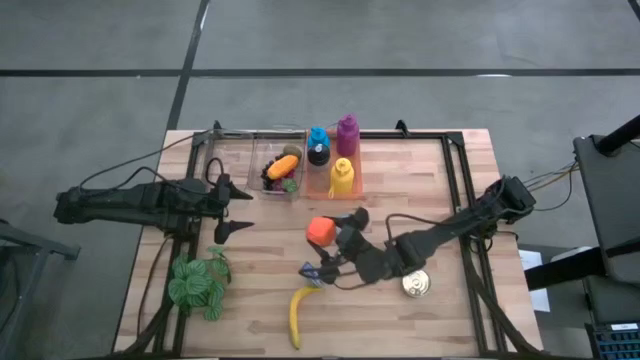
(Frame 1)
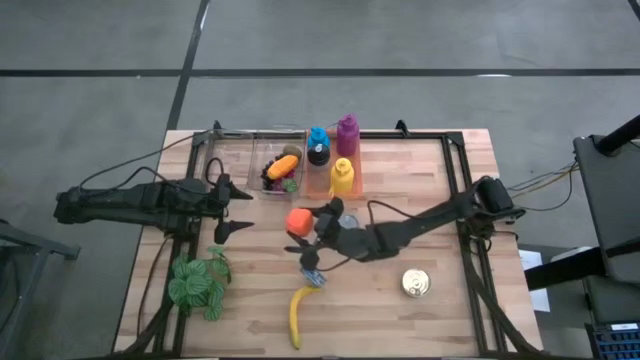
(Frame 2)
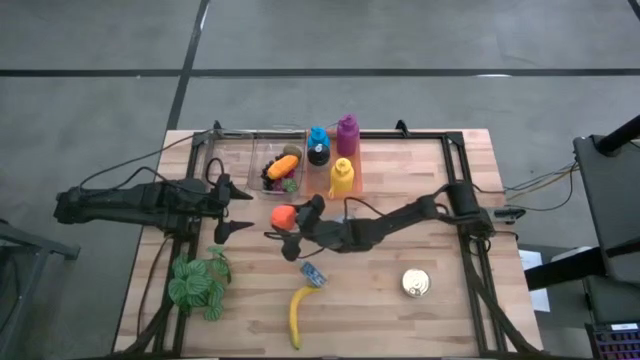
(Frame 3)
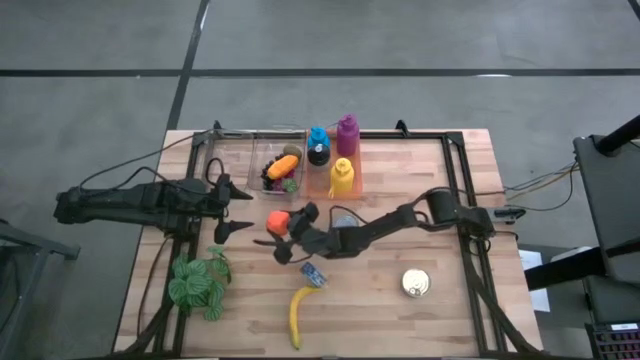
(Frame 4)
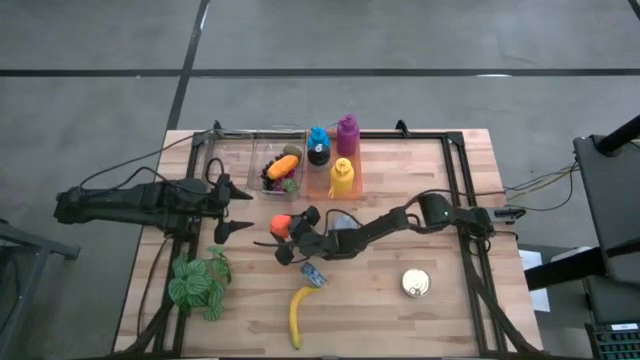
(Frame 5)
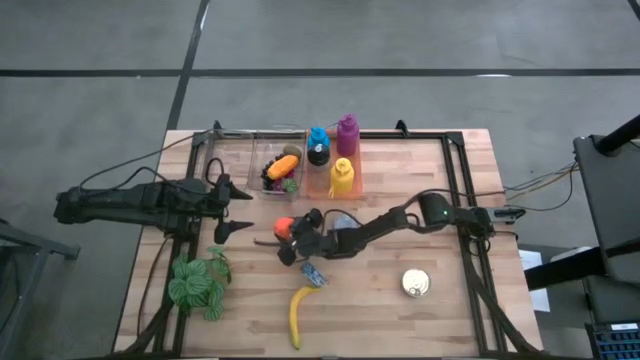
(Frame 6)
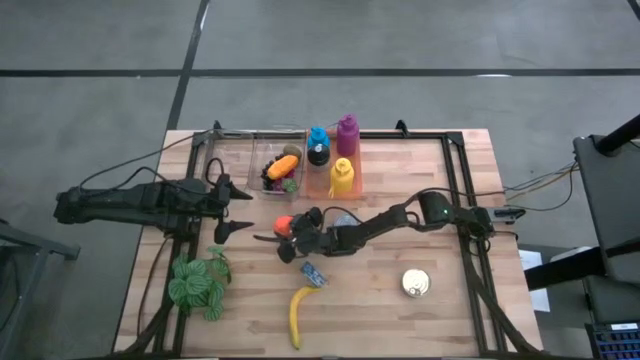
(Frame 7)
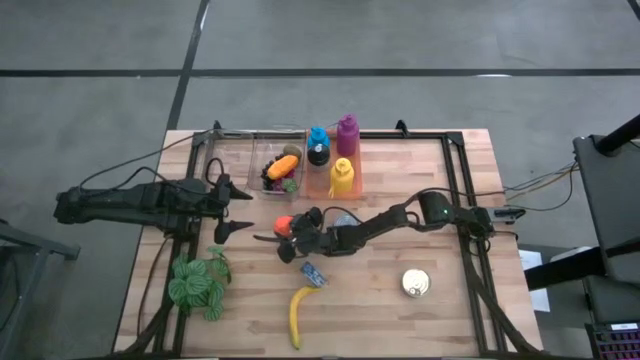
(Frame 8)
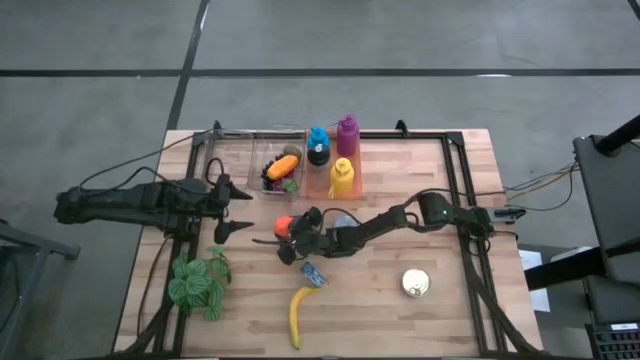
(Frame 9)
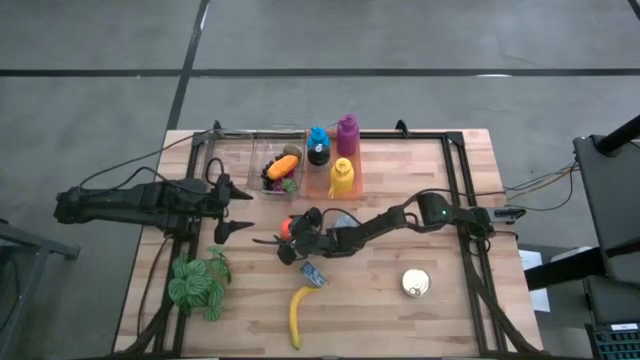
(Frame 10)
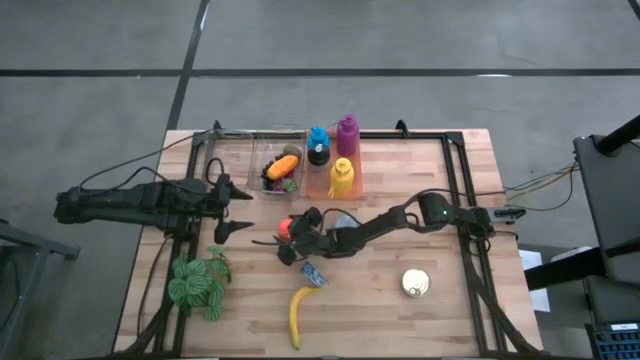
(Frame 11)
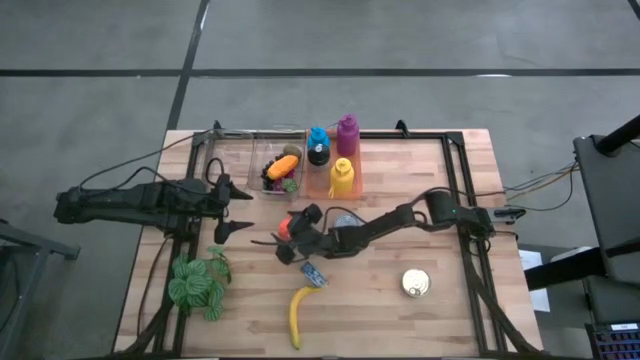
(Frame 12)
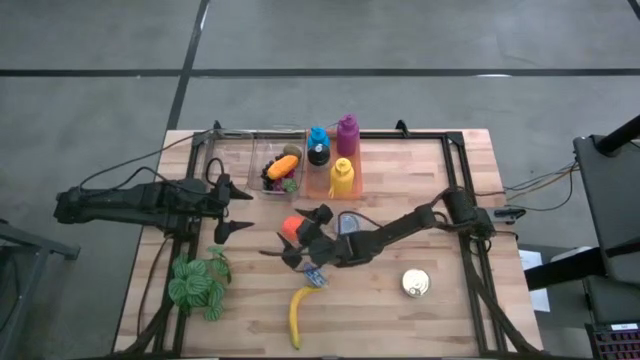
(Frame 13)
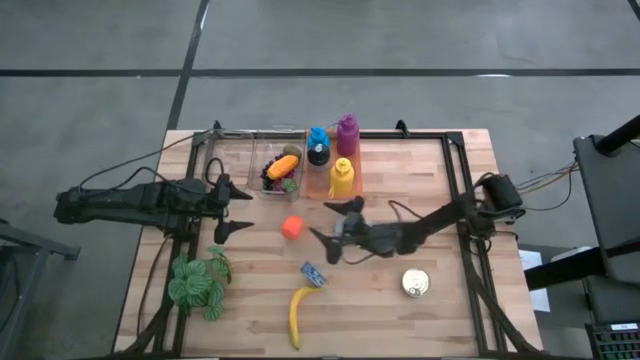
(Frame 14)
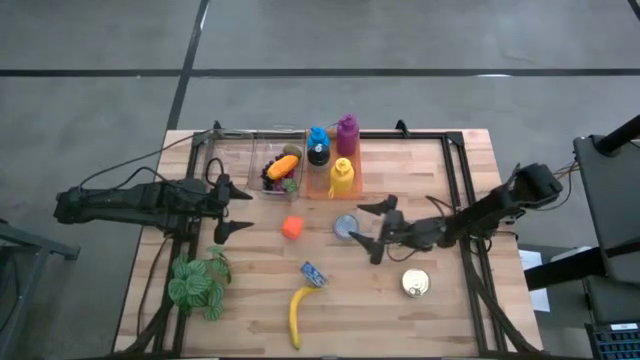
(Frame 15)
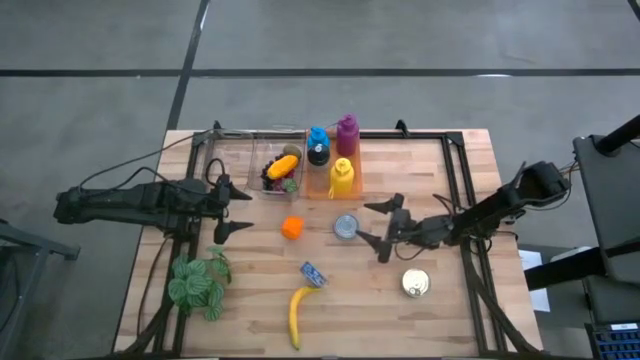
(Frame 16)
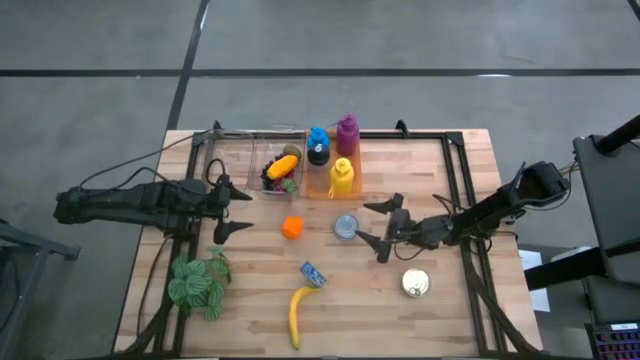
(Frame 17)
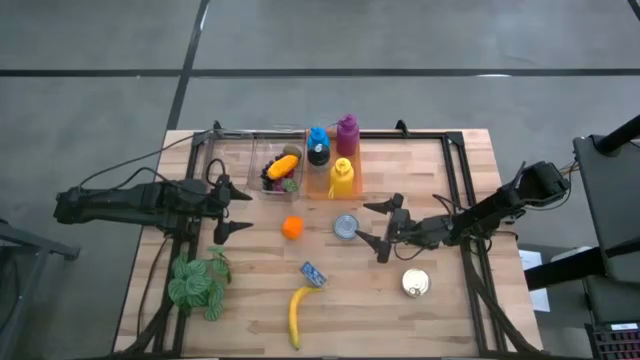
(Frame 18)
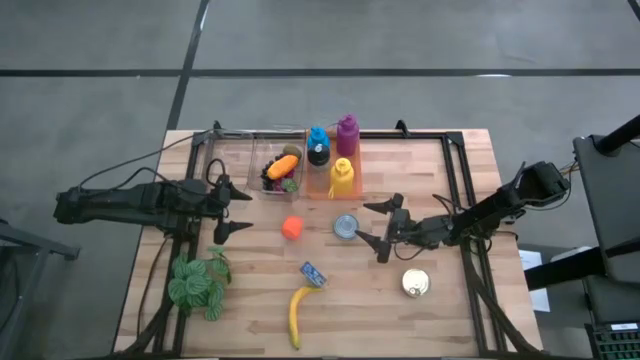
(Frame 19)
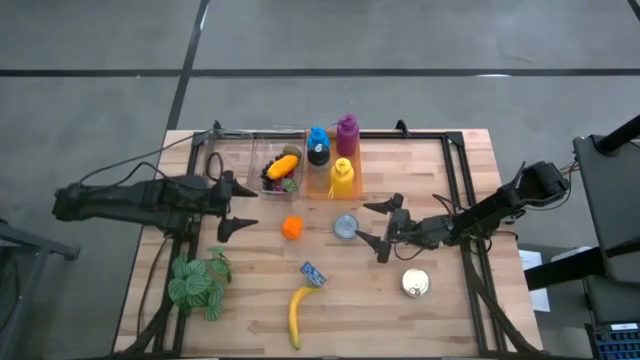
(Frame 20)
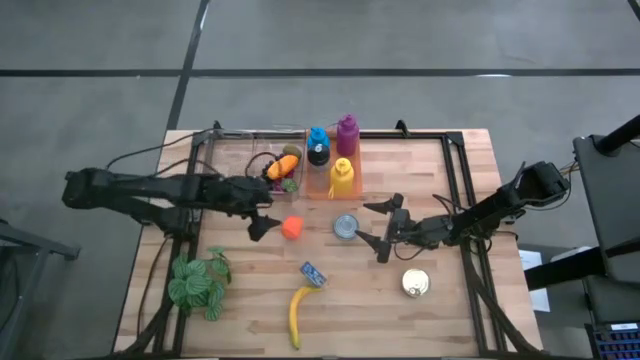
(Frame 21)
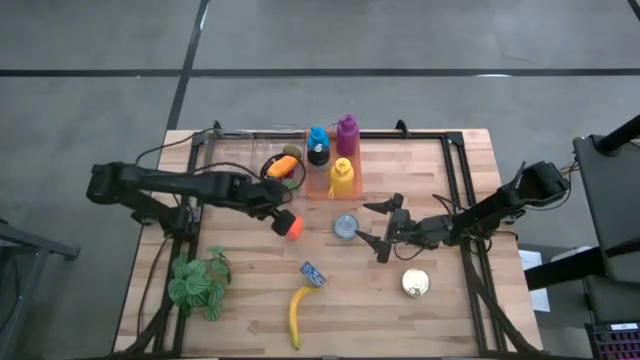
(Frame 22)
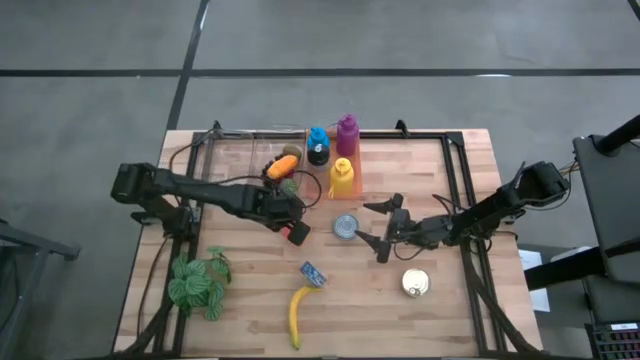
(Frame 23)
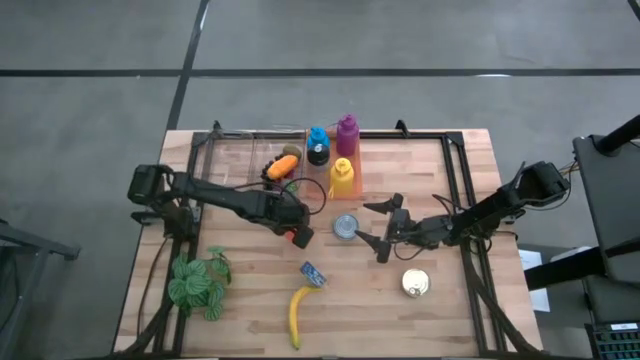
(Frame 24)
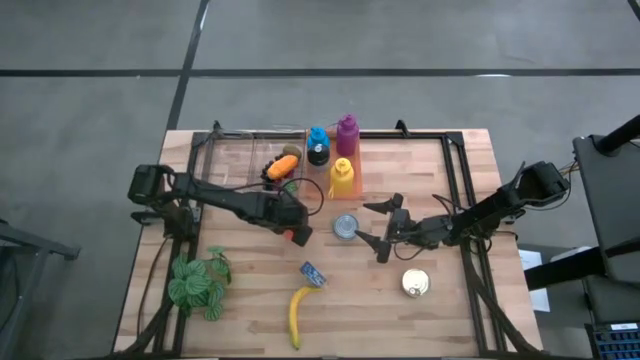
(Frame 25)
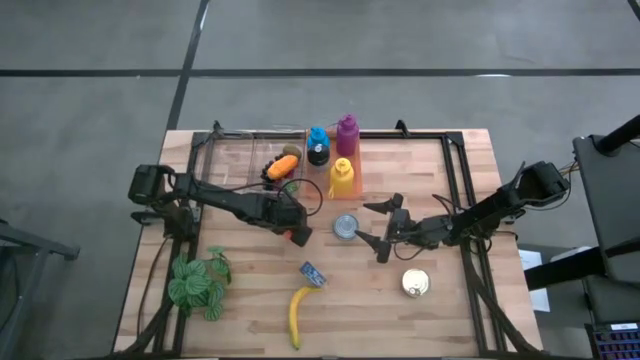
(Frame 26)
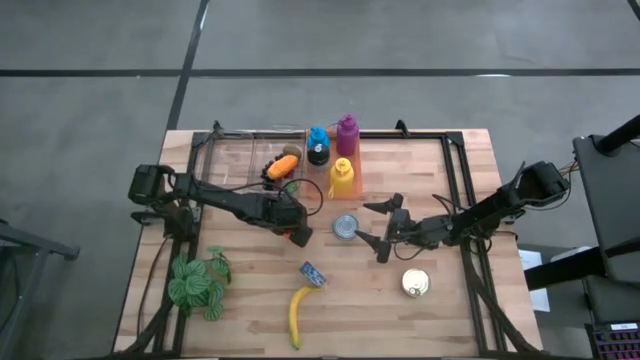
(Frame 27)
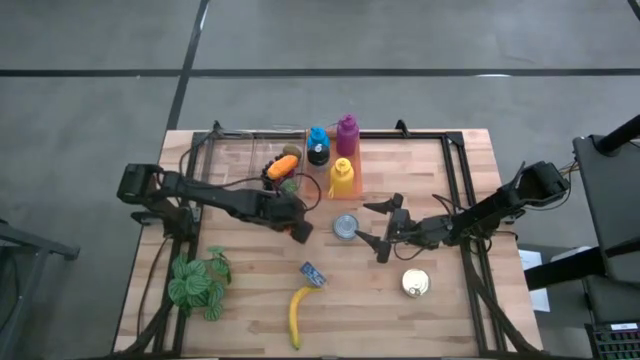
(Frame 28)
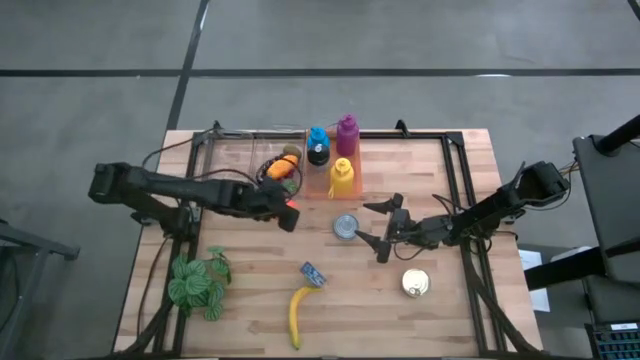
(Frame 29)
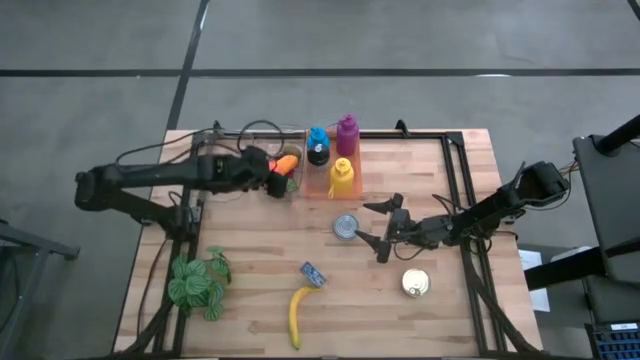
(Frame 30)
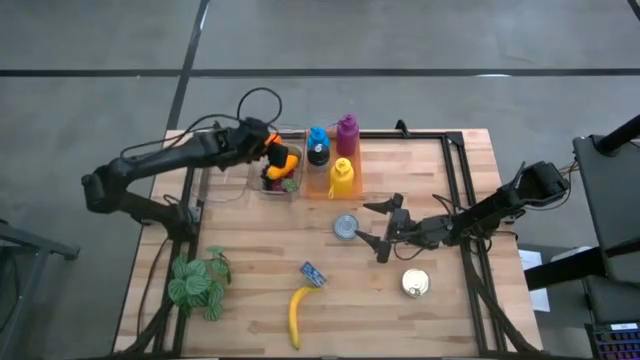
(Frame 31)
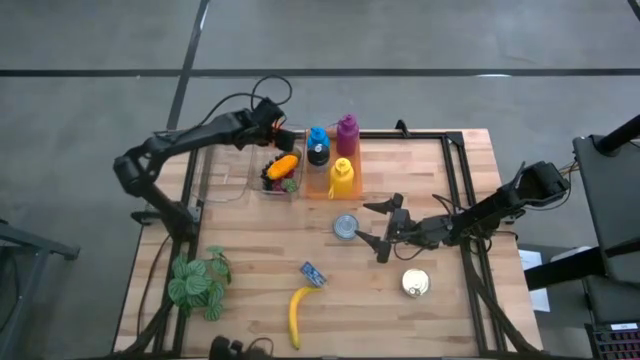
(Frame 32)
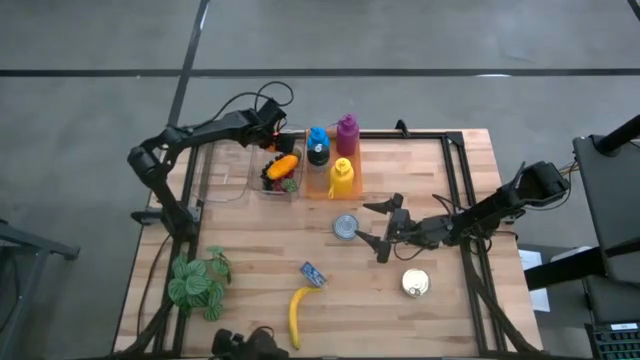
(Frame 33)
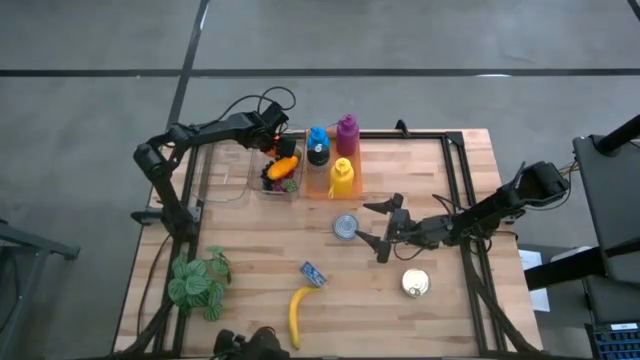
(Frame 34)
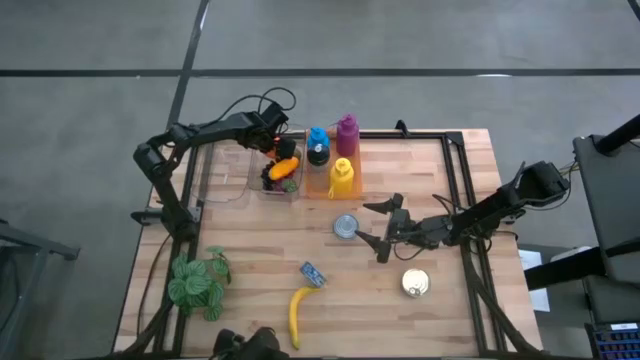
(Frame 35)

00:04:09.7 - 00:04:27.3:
Task: Pick & Place Food Item
Put the orange into the right transparent bin
